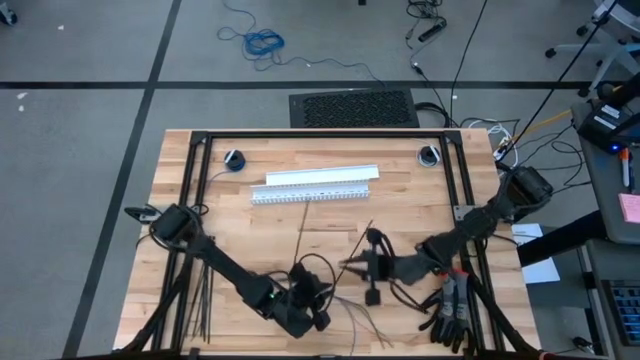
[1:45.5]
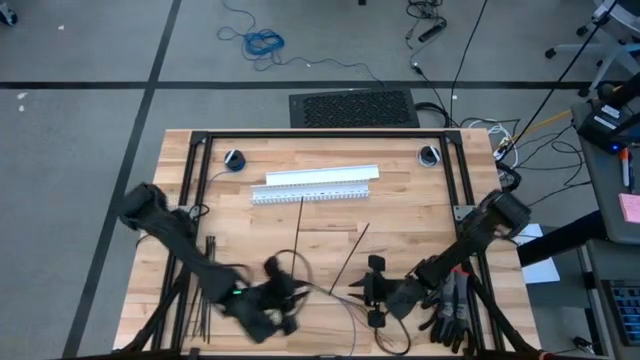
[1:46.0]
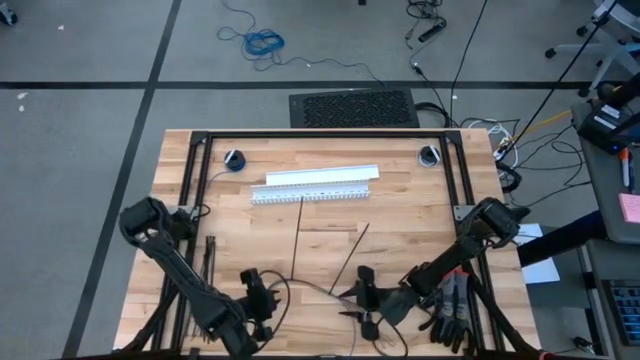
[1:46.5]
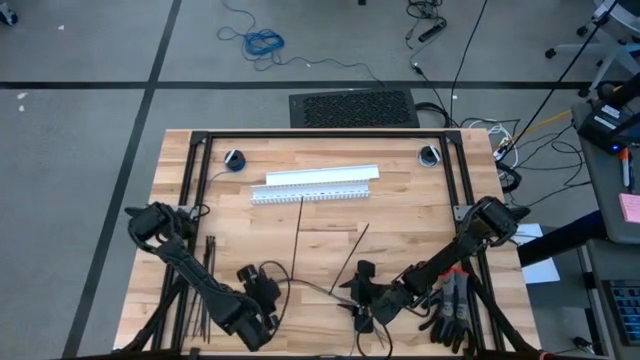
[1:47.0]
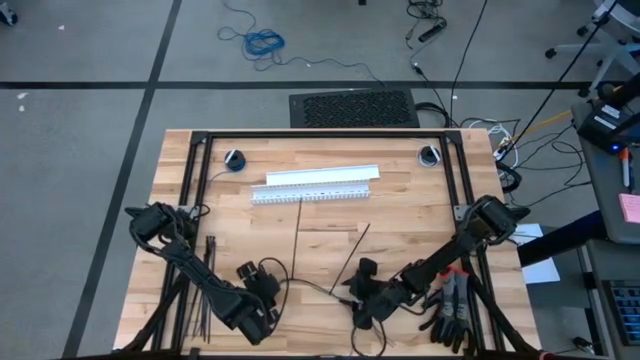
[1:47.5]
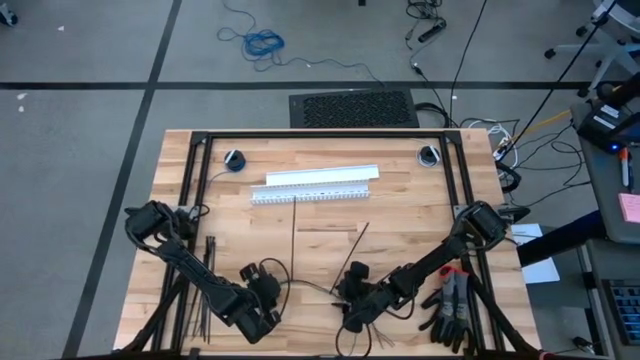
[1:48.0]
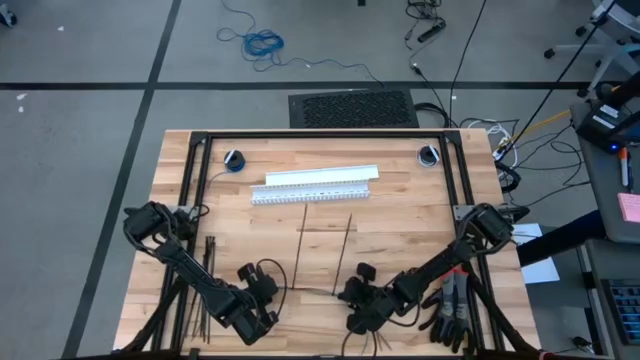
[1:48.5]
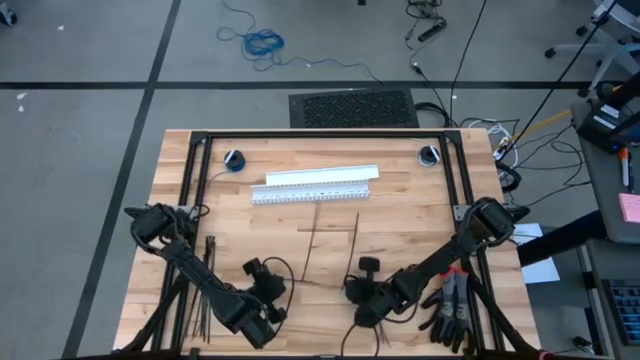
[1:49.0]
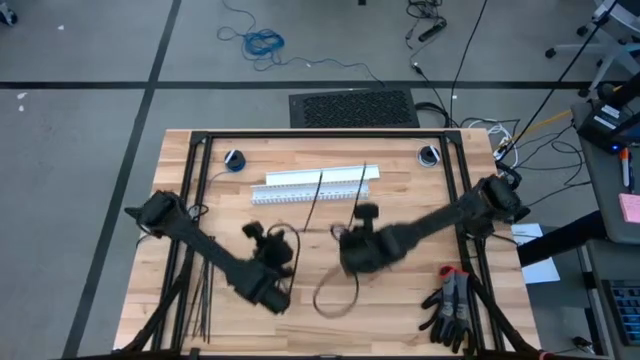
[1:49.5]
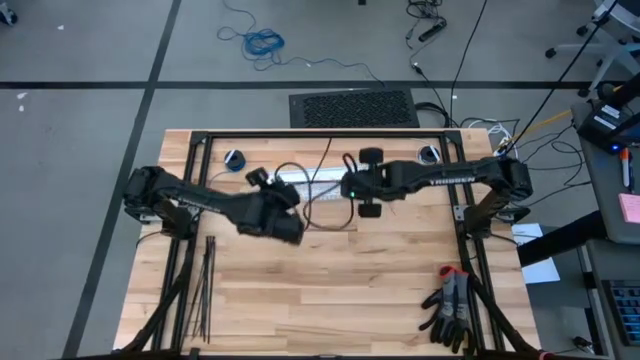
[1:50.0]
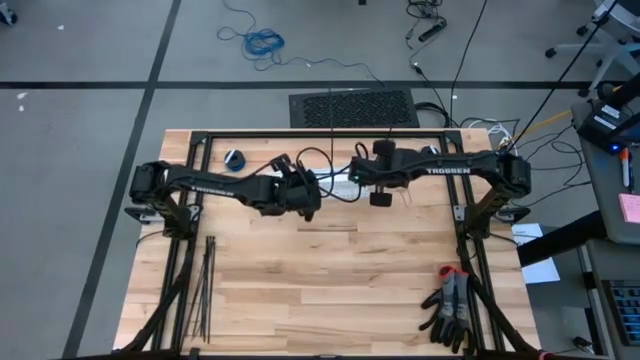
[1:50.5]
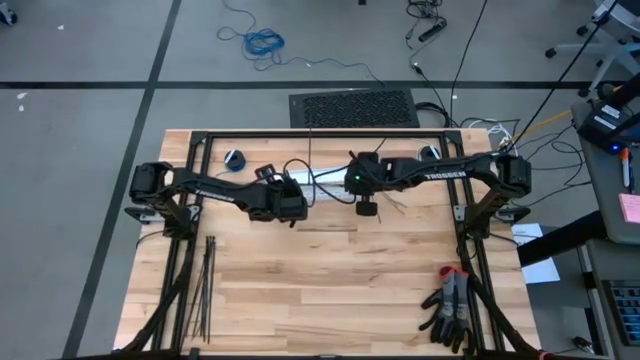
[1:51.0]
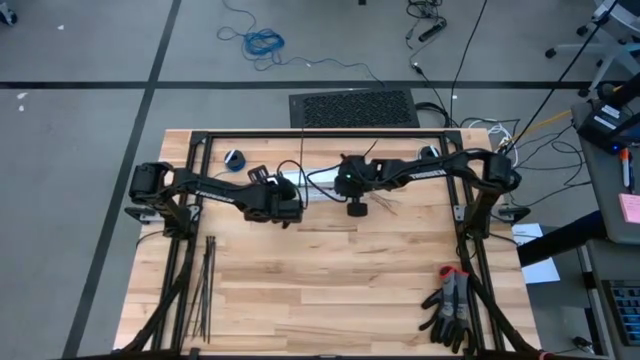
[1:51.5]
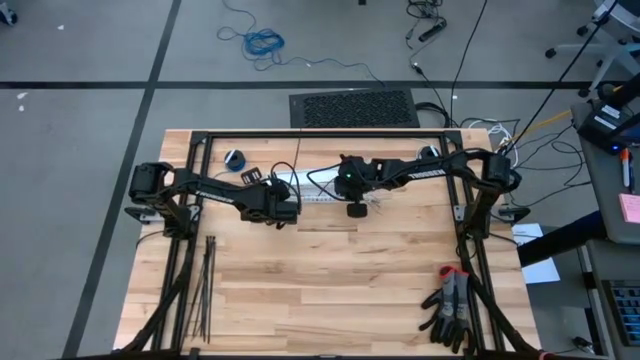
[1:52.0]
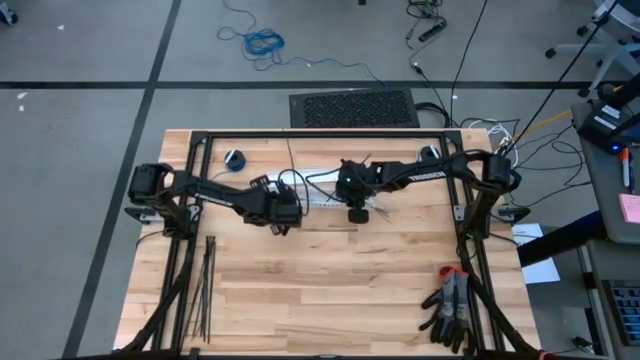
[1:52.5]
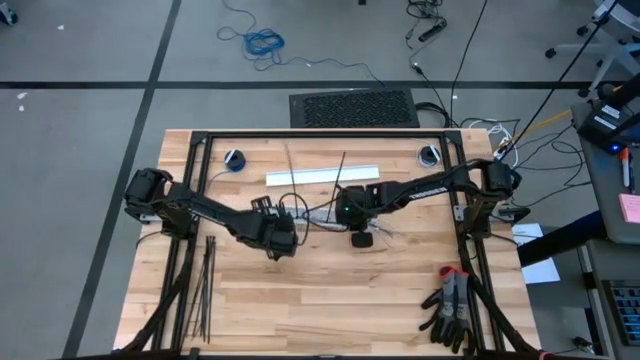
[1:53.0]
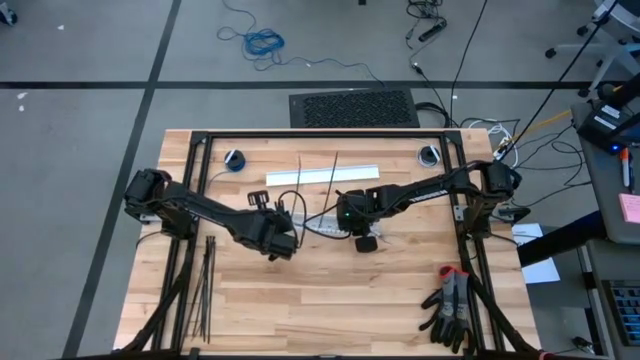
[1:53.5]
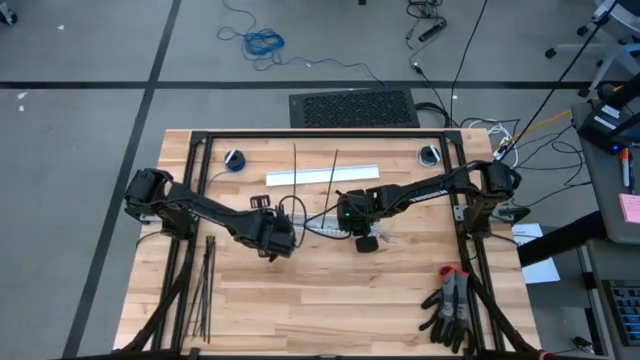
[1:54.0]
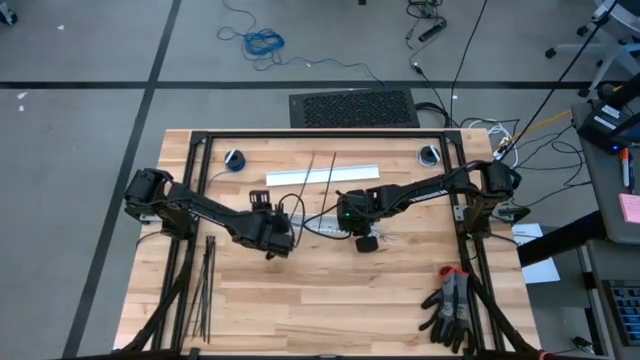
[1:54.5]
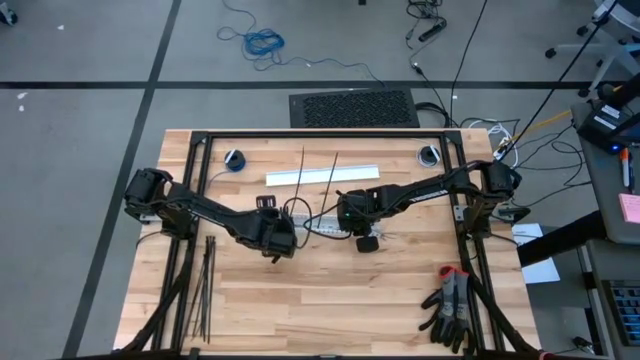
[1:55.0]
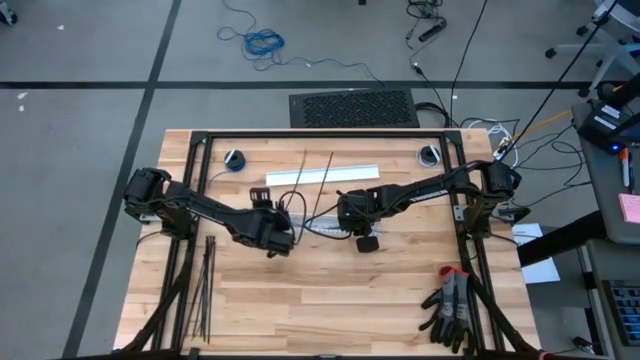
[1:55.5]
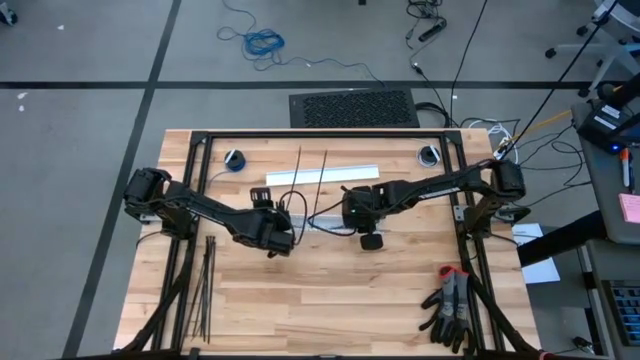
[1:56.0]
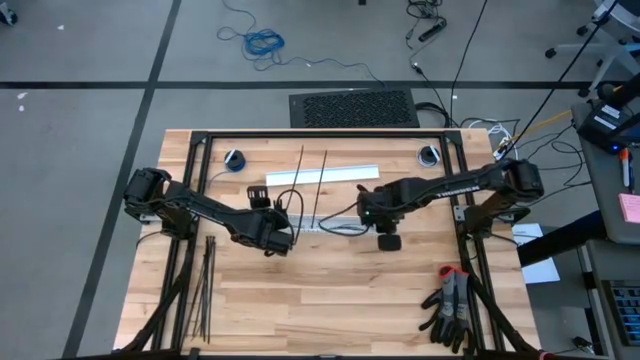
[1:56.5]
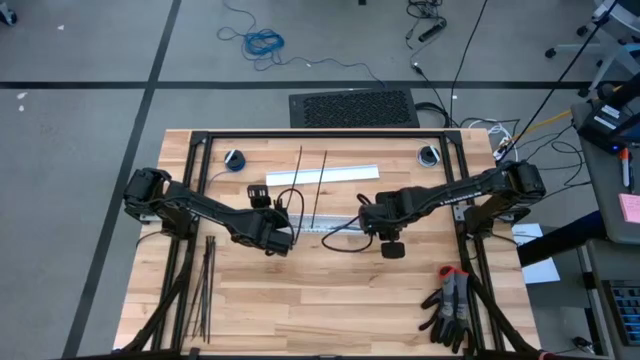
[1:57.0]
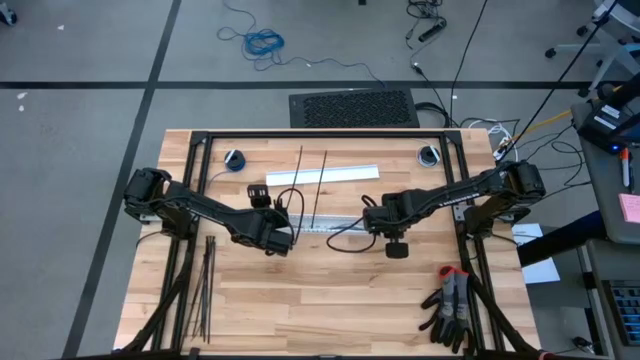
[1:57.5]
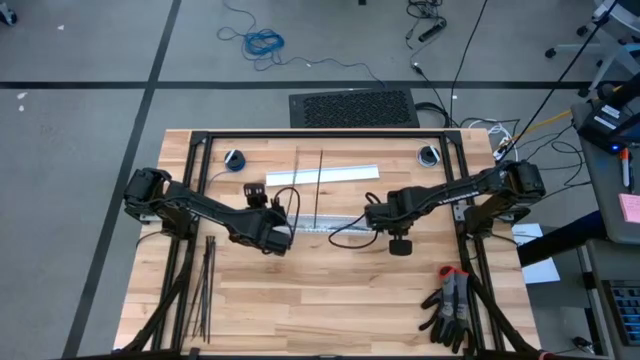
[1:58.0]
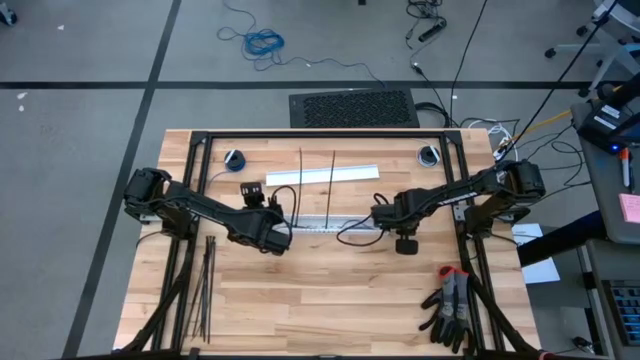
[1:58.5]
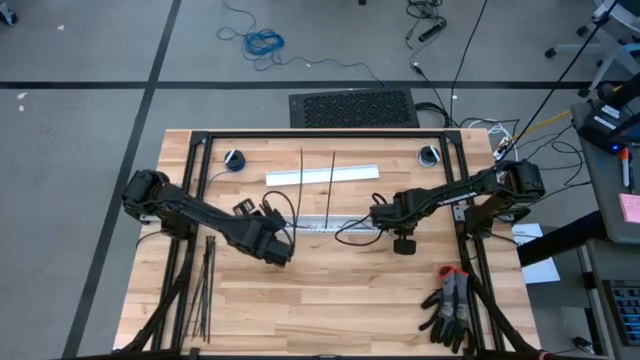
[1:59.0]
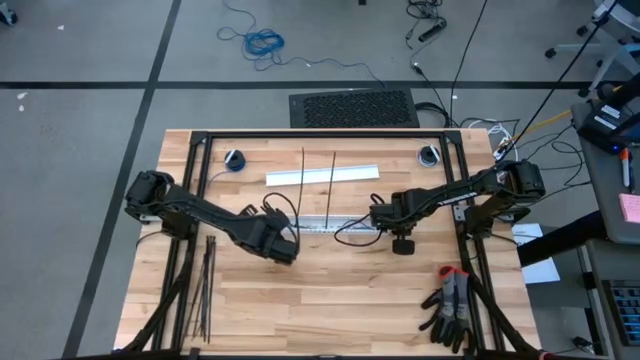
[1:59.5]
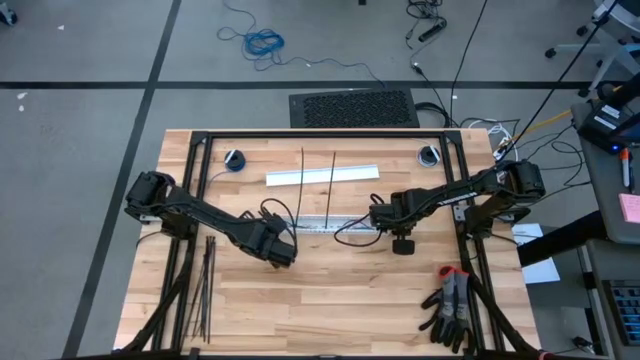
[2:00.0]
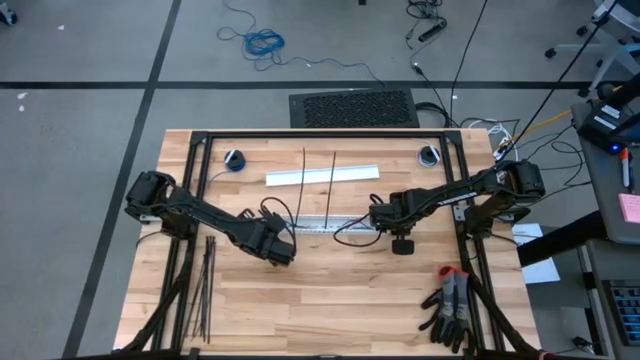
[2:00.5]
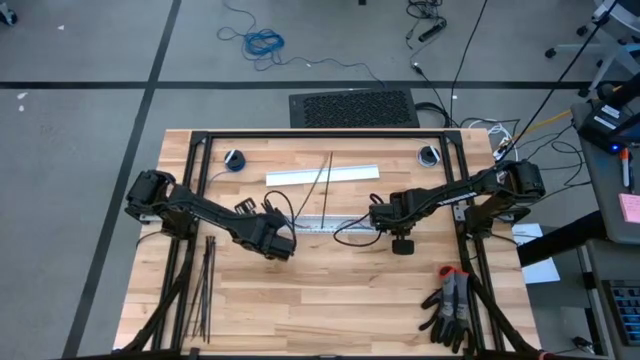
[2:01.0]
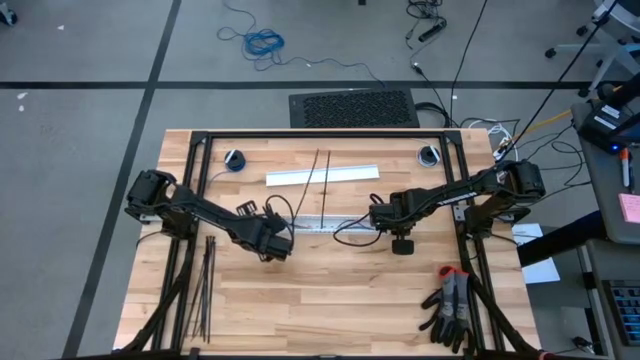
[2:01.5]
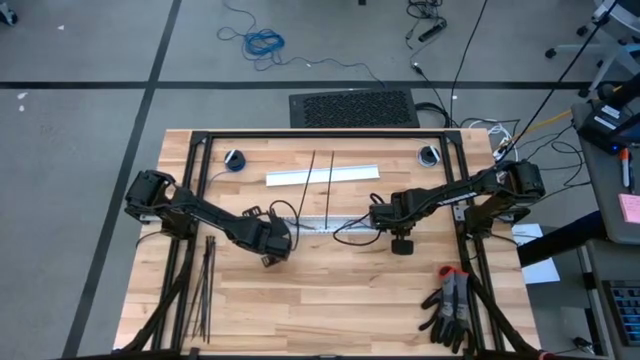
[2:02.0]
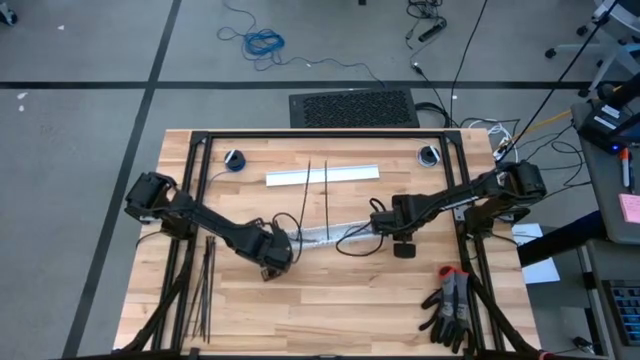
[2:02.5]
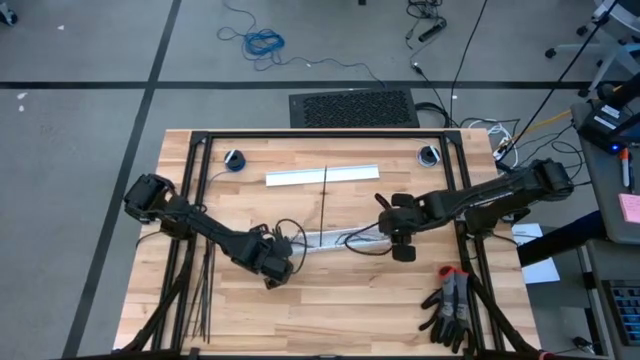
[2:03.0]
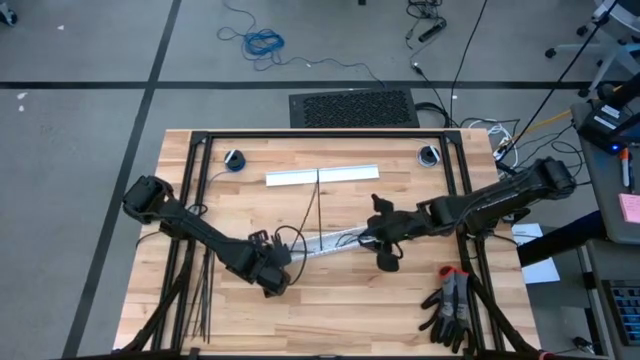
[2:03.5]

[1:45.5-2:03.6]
Task: Ziptie cables
Put the zip-tied cables into the white cable duct

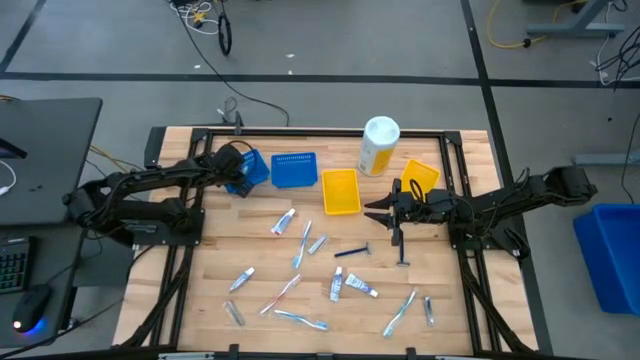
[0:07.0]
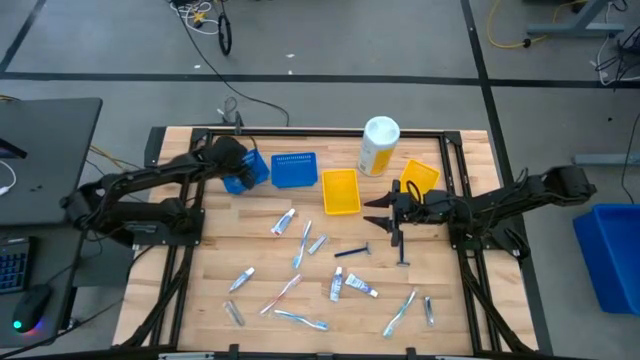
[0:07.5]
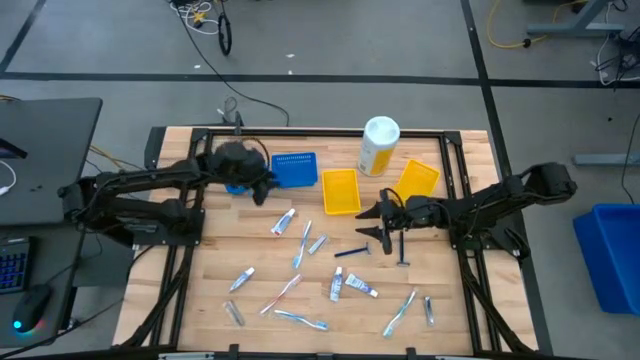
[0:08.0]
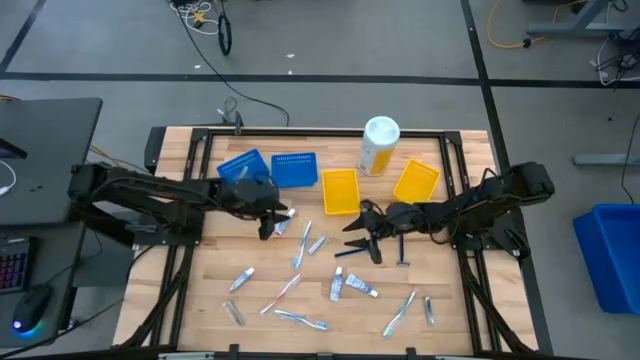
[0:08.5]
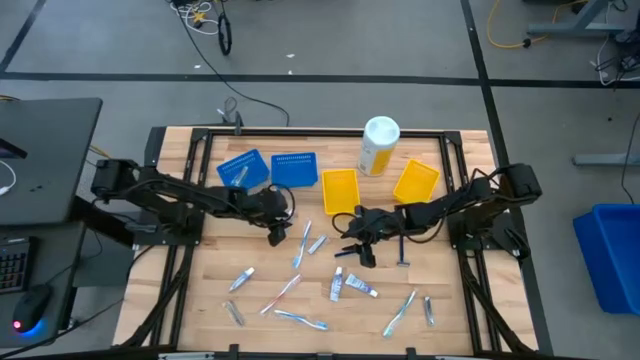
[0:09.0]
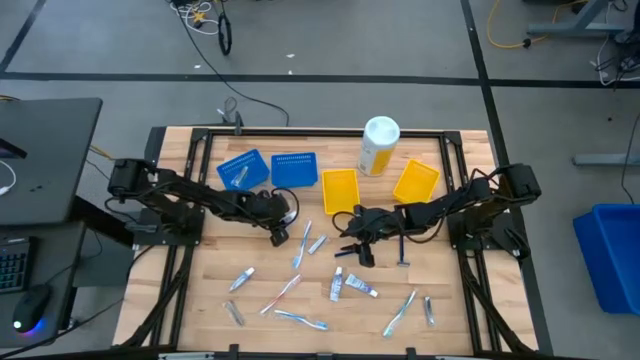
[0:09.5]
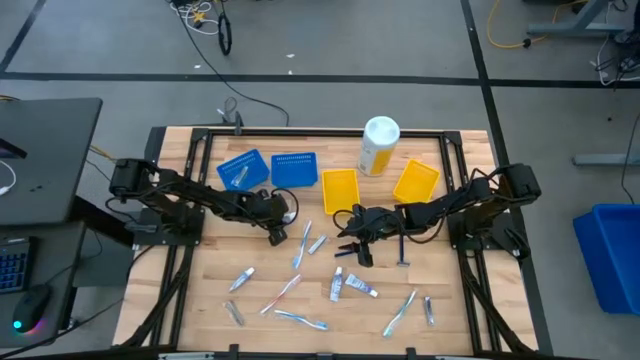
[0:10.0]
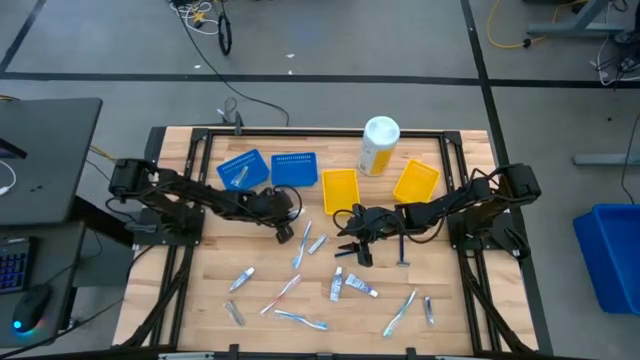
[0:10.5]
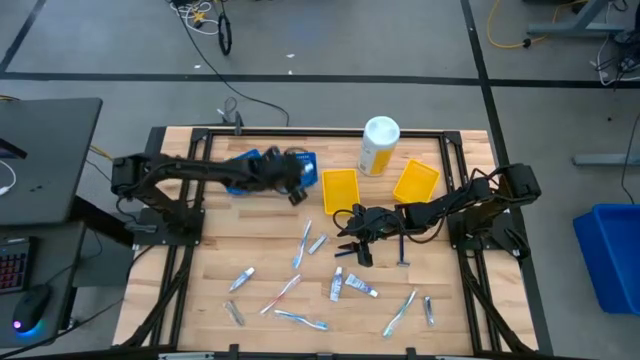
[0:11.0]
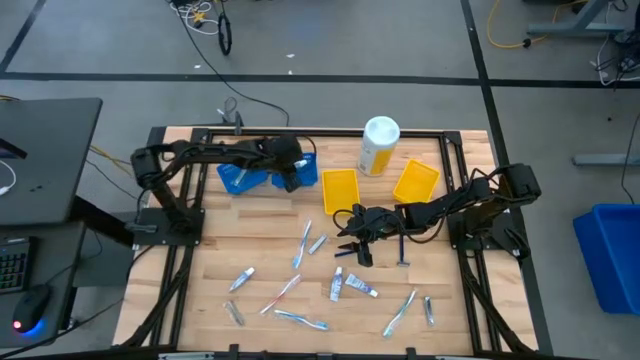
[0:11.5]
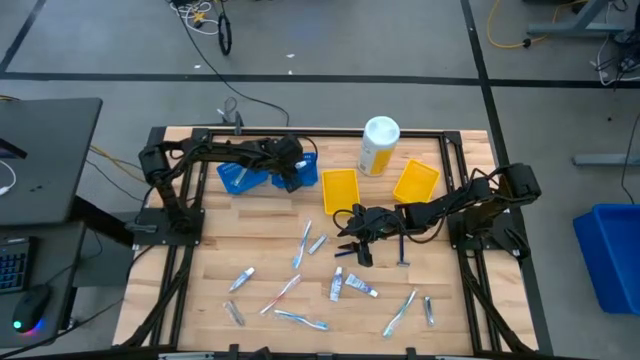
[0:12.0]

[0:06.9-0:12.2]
Task: Pick & Place Travel size toiletries
Put the white toothpaste into the right blue bin
